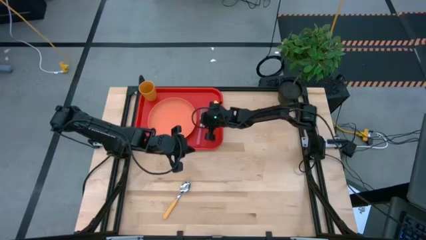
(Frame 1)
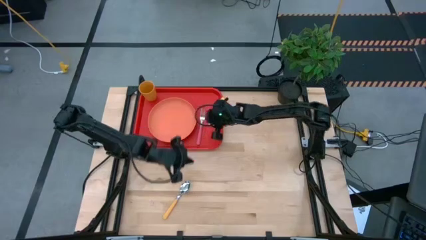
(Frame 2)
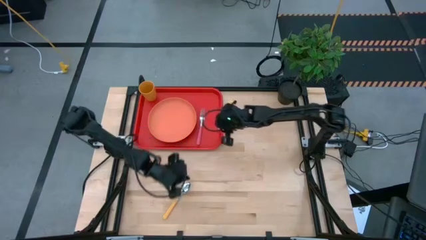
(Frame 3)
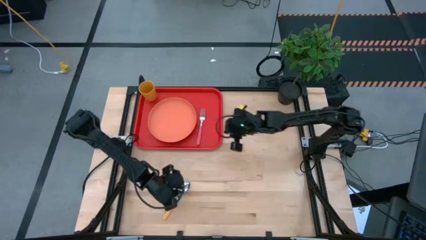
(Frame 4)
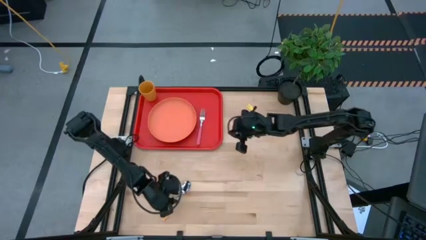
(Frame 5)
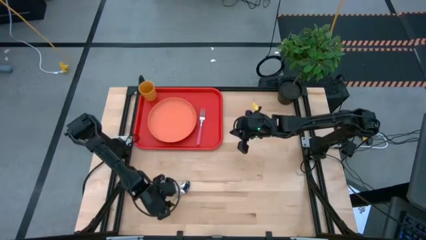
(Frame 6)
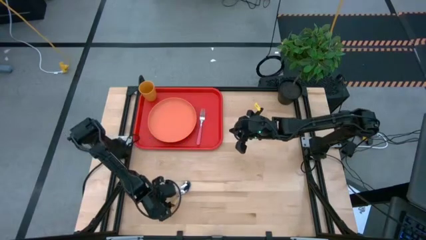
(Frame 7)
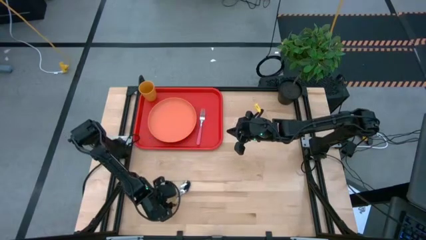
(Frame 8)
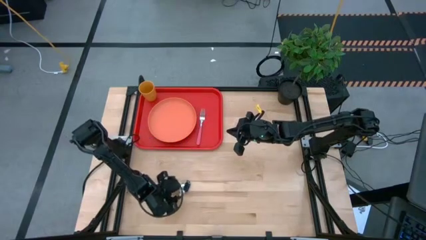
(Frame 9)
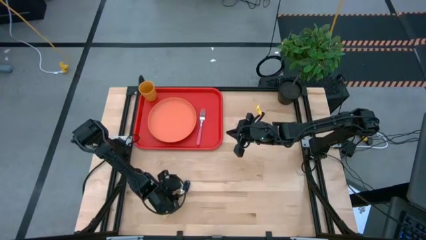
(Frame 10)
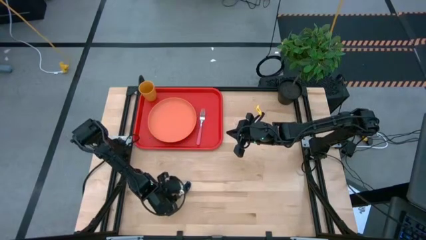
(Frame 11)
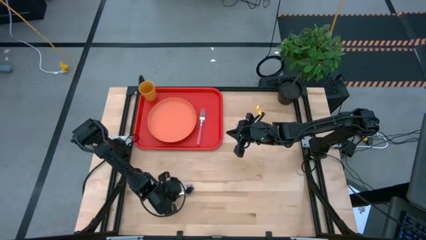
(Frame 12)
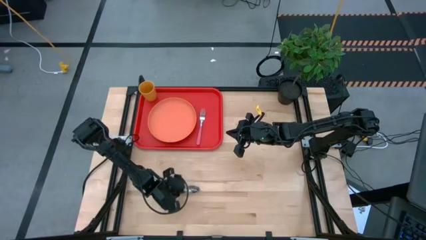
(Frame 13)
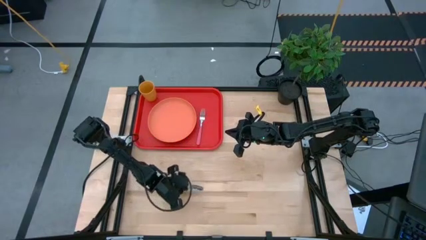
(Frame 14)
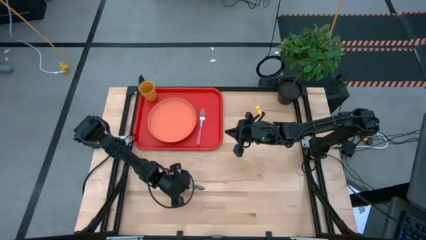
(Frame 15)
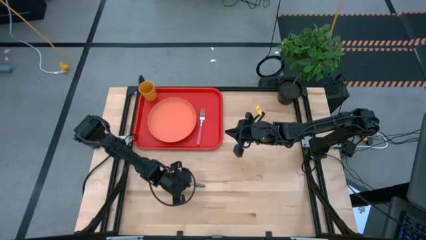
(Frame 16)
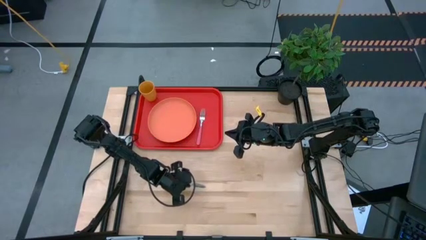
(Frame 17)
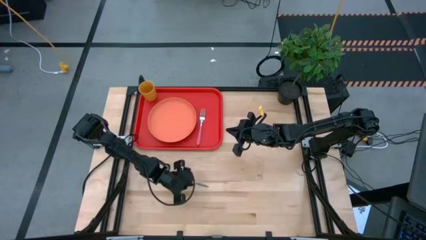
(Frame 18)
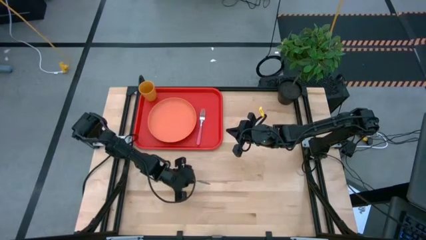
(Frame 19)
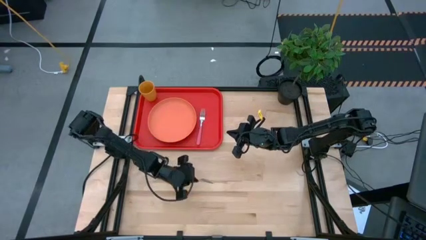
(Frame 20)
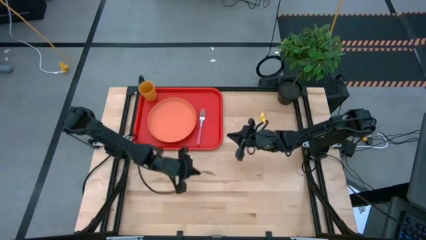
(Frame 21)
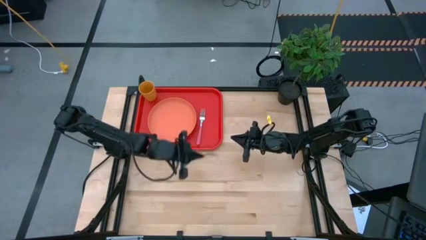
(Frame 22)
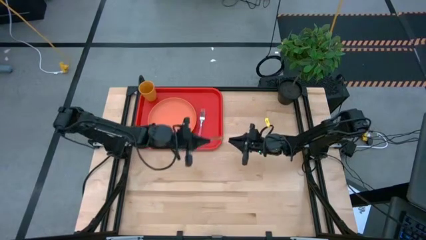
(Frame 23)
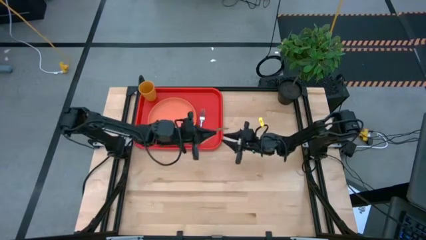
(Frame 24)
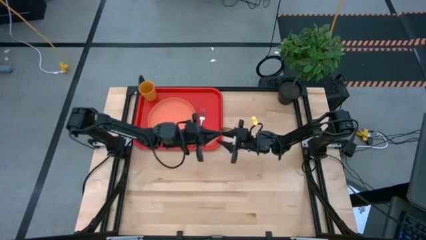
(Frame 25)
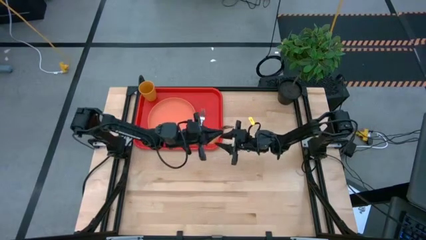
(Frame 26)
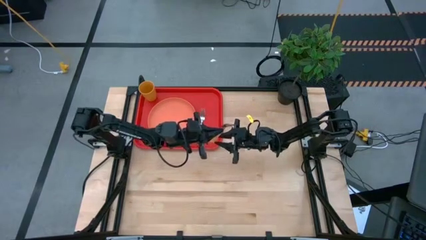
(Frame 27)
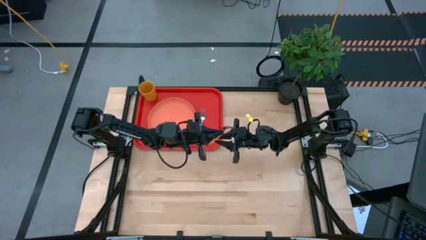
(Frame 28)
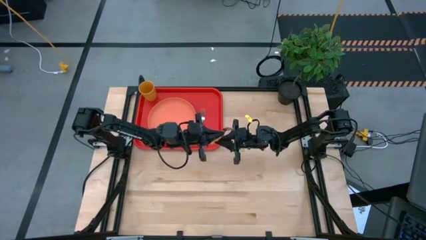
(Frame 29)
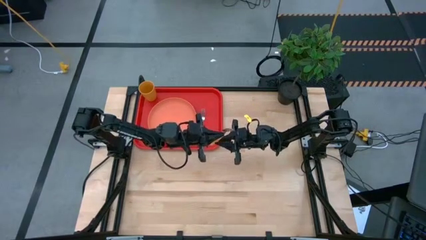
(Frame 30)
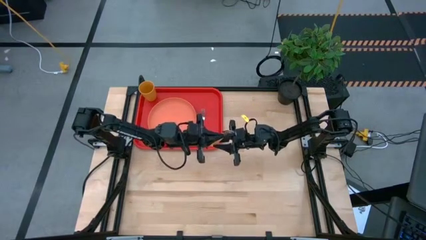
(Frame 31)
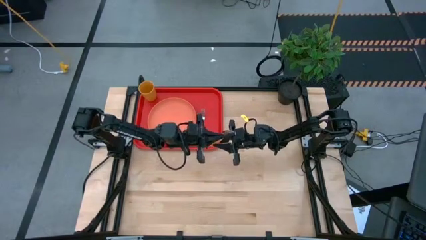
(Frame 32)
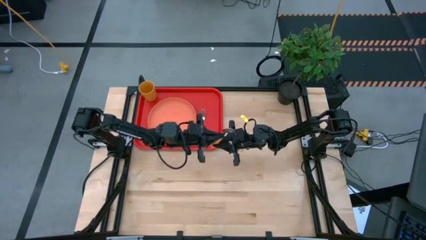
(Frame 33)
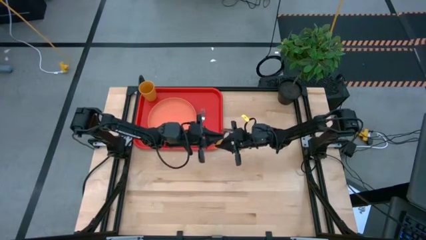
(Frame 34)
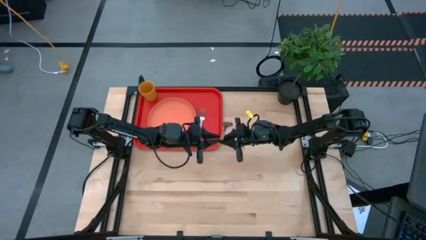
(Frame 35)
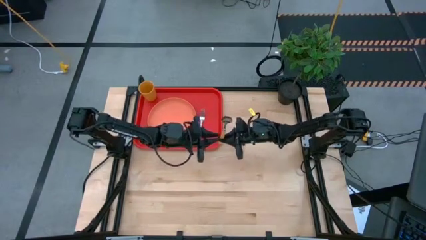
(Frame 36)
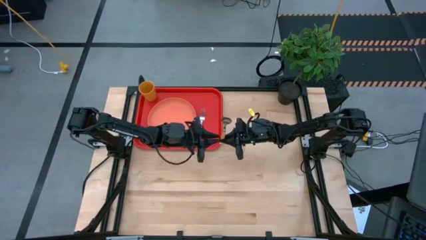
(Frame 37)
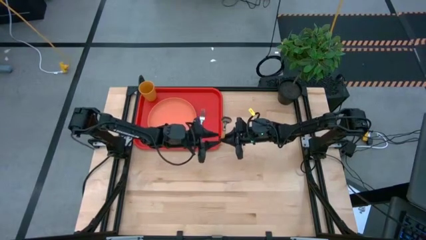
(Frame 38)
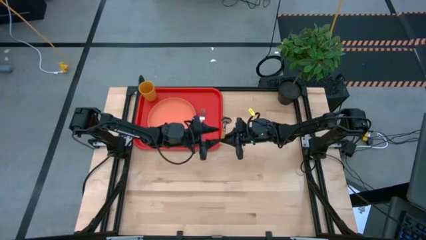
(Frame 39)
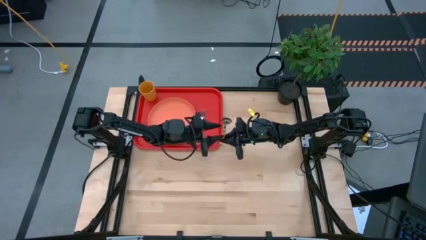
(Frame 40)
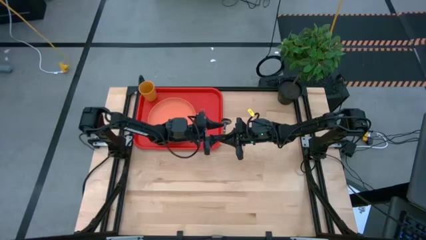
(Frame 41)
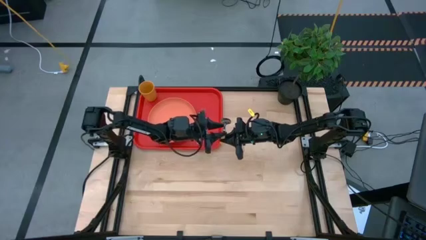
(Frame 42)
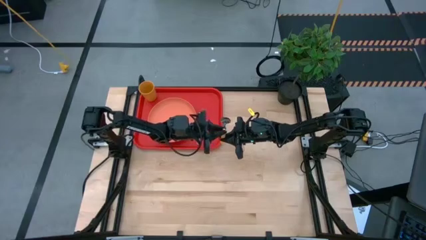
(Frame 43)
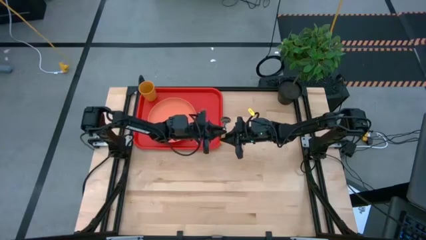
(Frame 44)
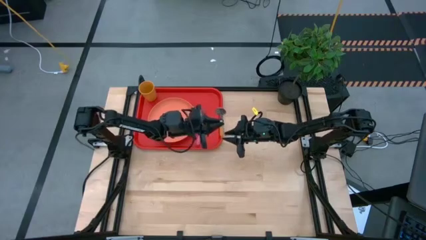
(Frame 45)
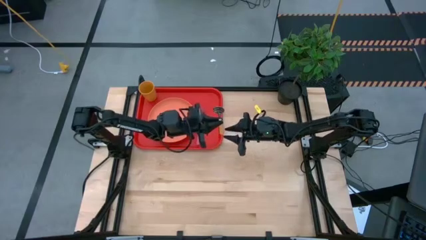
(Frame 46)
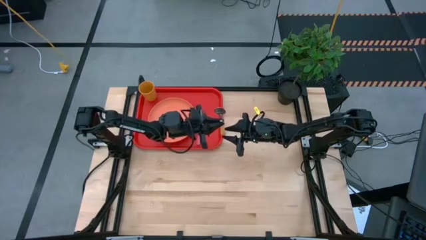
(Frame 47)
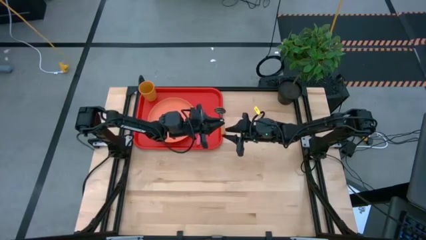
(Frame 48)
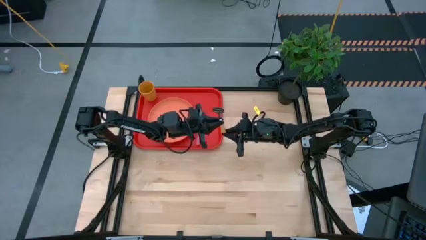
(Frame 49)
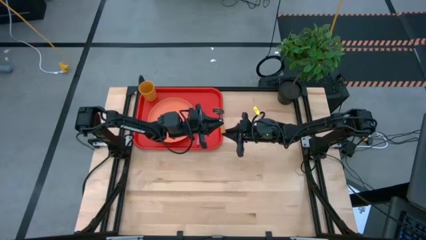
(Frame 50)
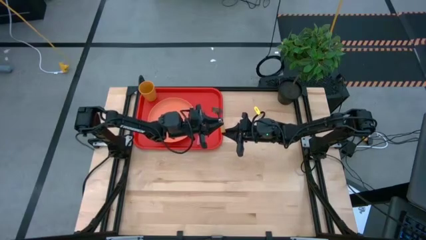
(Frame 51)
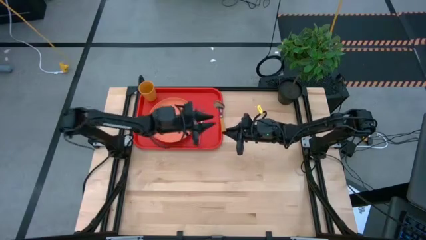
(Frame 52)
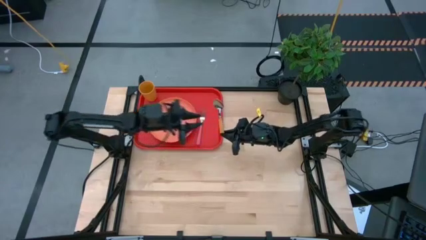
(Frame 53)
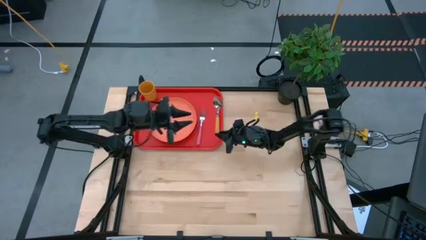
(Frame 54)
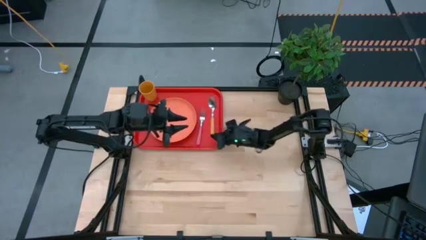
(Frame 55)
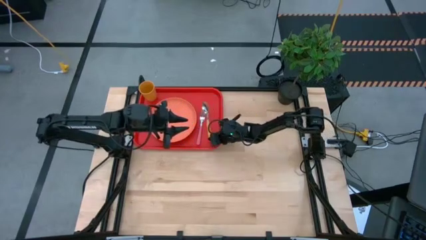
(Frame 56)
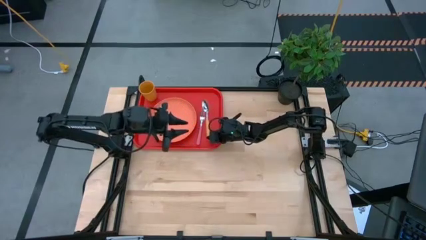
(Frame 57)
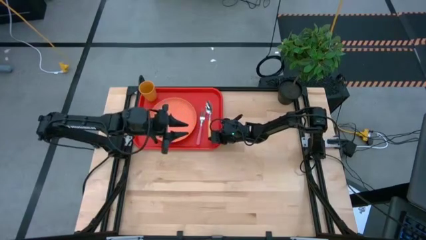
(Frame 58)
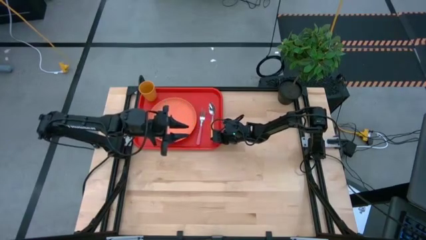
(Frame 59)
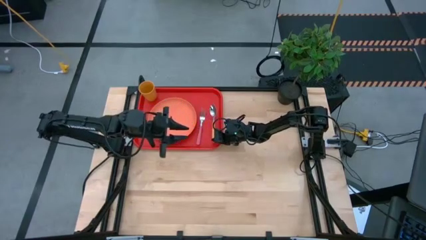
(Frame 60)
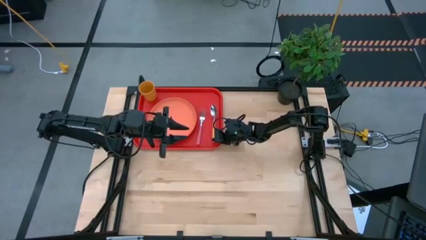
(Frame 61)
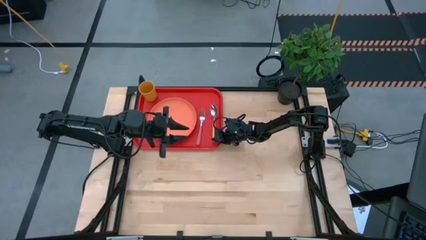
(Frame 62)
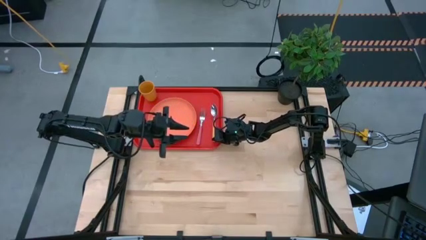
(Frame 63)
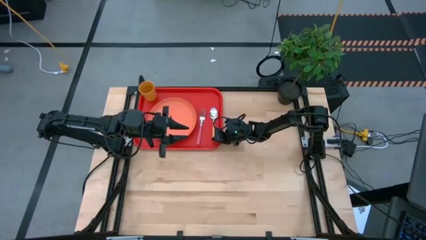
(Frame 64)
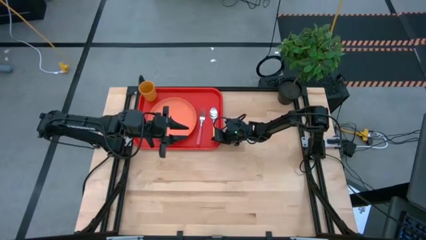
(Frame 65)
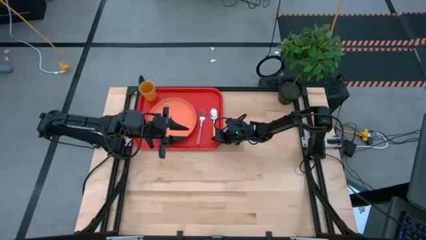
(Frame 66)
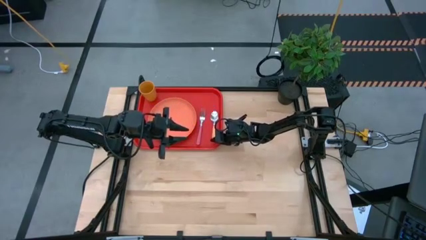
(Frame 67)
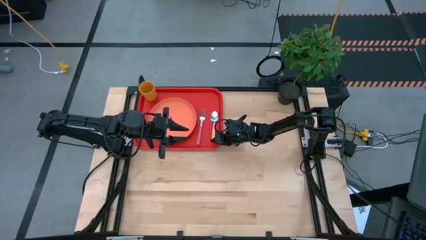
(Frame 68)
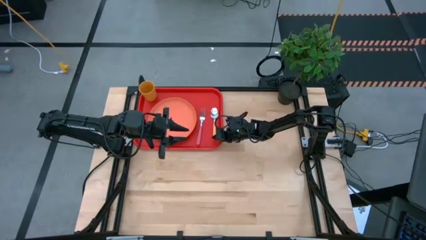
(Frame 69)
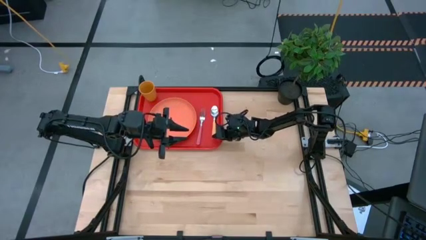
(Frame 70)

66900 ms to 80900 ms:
Task: Pick and place plate/cup/fork/spoon on tray
Put the orange spoon on the red serving tray to right of the pink fork

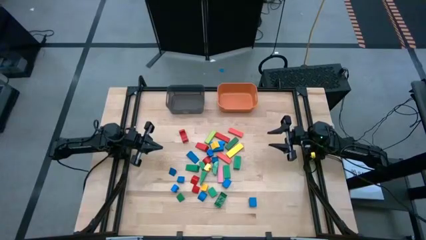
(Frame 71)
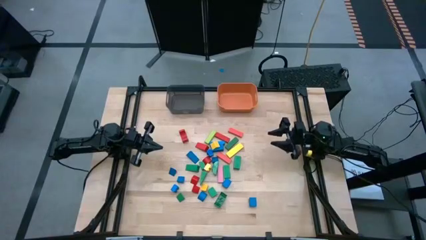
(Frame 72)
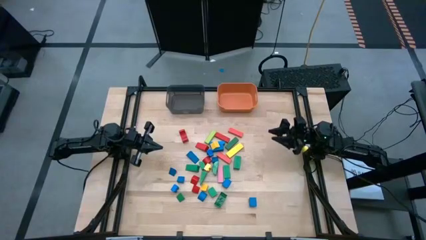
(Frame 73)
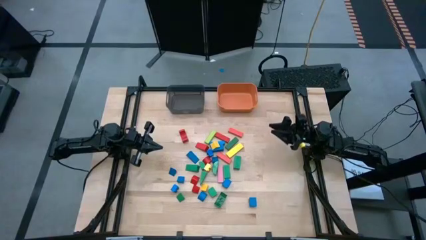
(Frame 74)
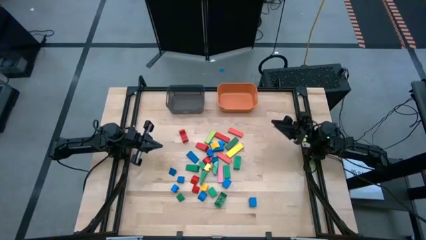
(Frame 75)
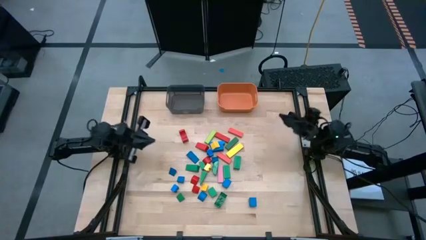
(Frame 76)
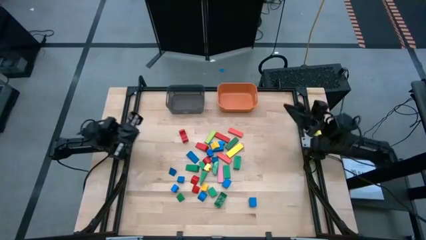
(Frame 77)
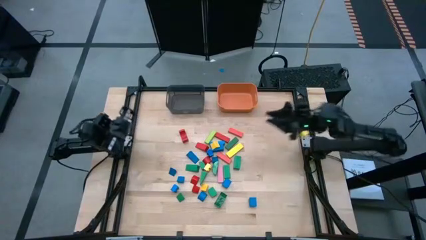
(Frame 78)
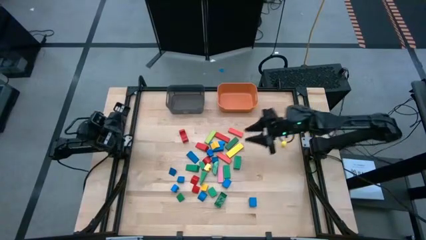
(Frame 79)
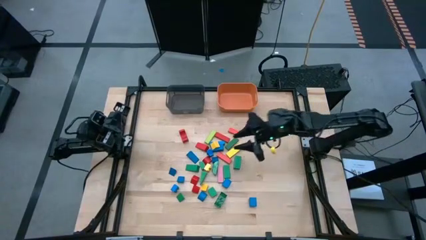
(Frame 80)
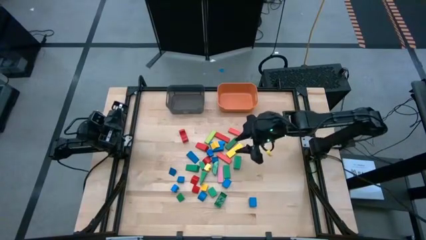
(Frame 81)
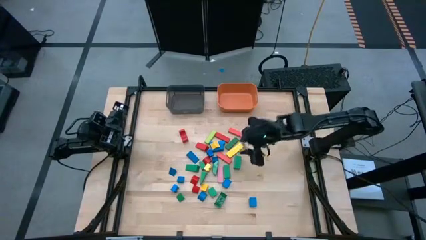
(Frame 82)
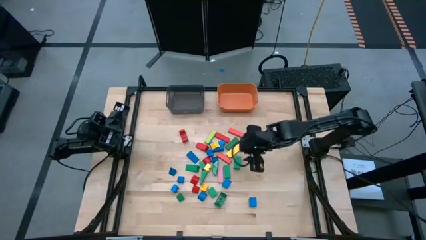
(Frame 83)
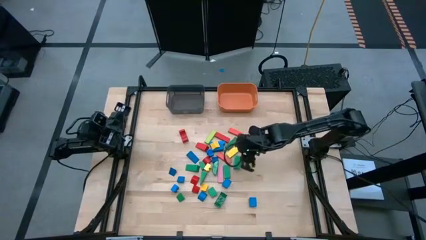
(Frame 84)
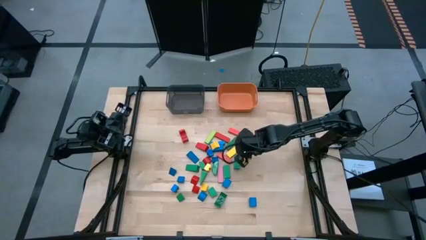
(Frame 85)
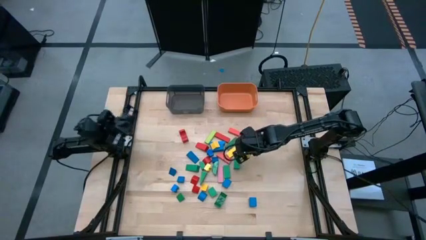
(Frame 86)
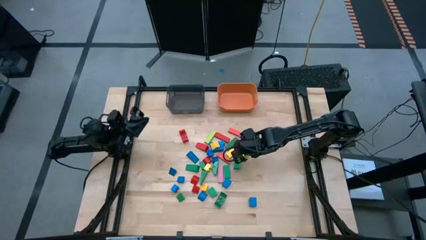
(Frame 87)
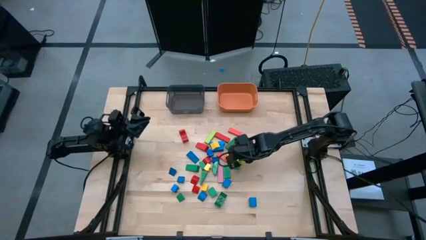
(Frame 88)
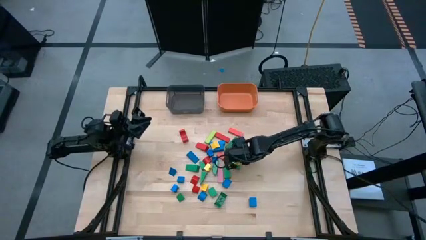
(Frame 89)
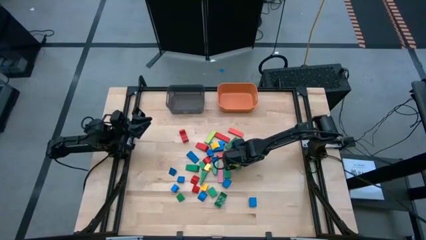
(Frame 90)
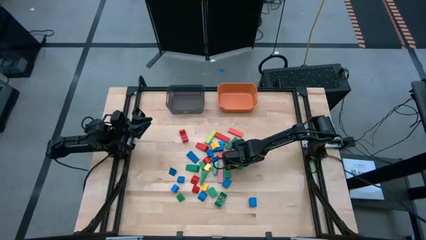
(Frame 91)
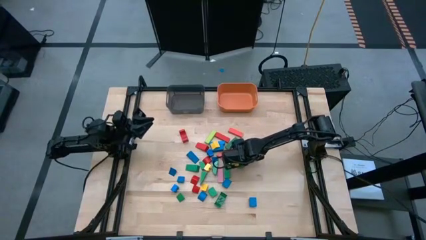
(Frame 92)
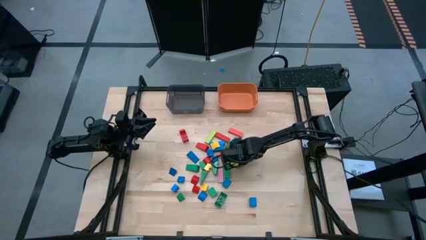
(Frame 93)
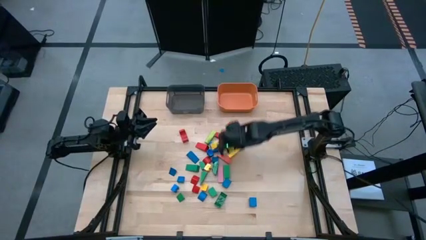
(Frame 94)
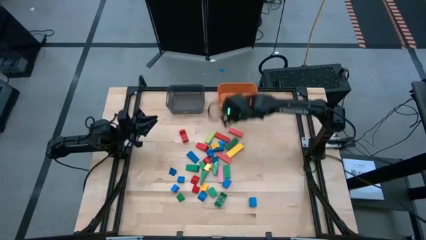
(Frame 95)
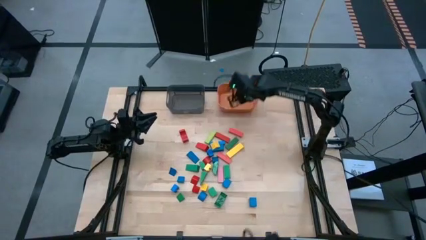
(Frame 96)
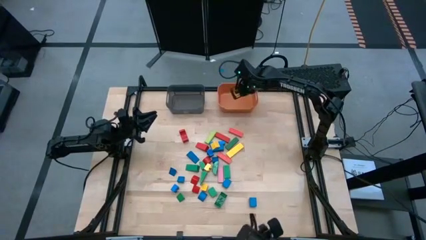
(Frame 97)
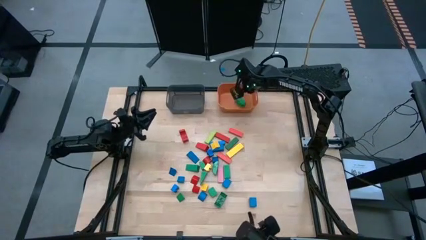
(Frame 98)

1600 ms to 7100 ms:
Task: Sort blocks by size
Put the large green block into the orange bin
